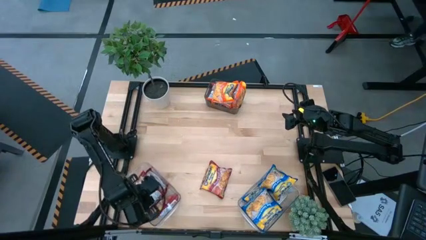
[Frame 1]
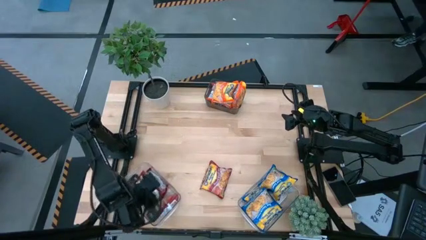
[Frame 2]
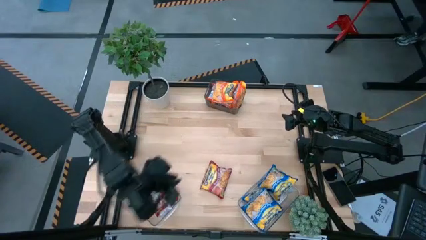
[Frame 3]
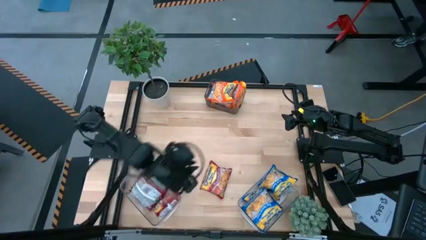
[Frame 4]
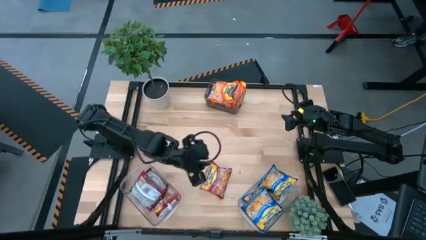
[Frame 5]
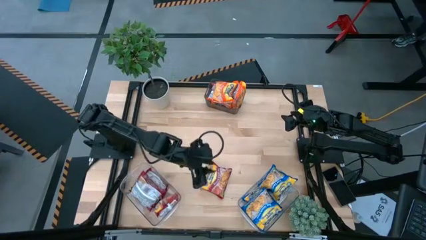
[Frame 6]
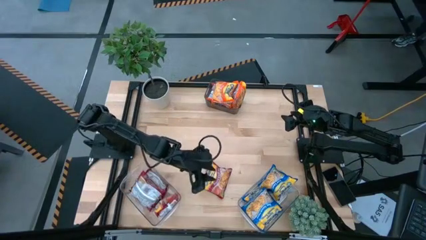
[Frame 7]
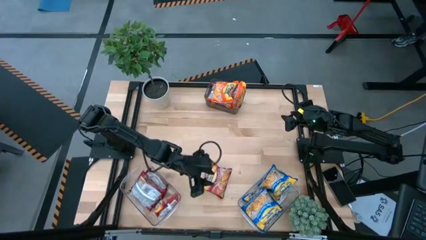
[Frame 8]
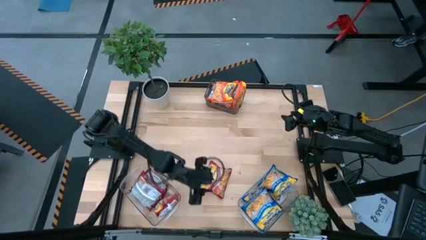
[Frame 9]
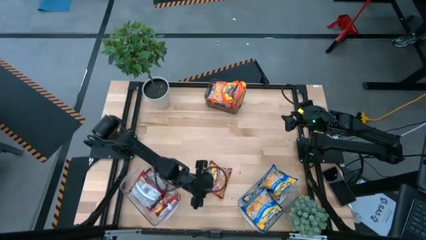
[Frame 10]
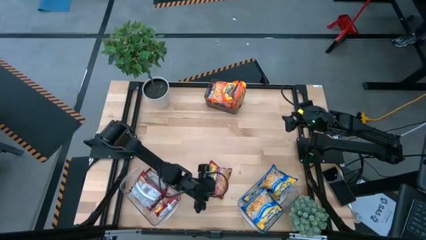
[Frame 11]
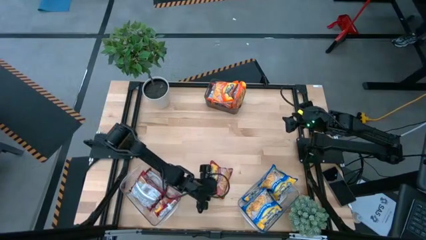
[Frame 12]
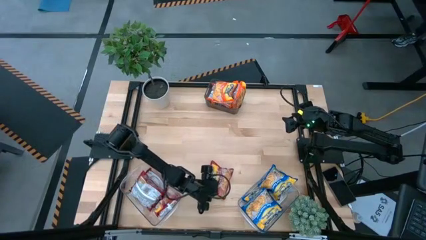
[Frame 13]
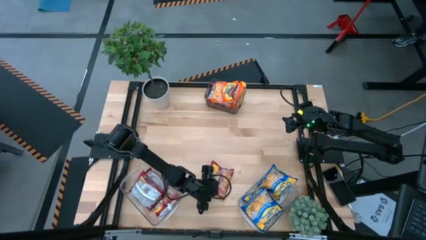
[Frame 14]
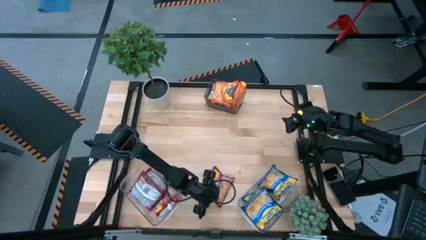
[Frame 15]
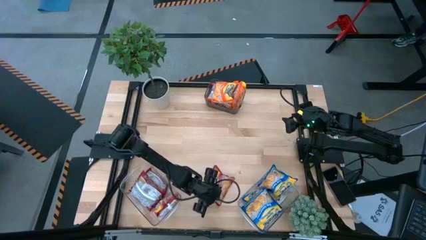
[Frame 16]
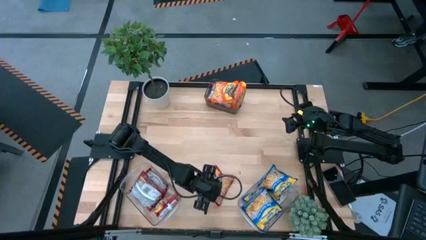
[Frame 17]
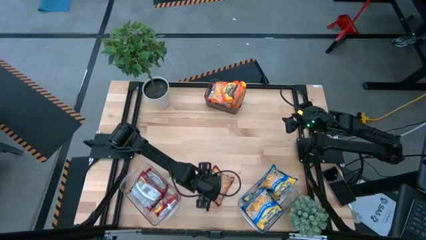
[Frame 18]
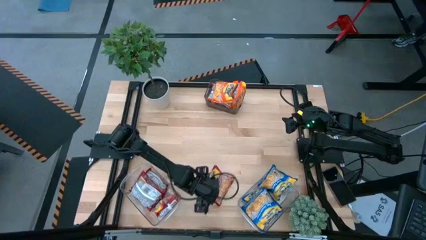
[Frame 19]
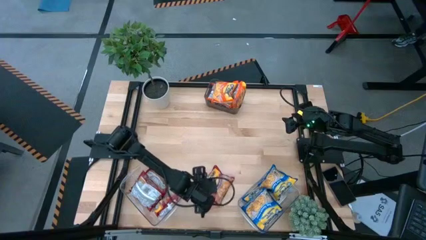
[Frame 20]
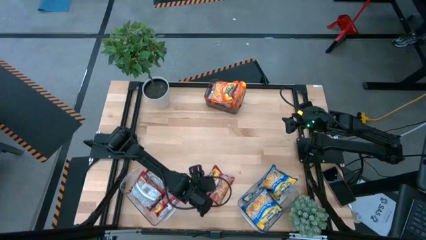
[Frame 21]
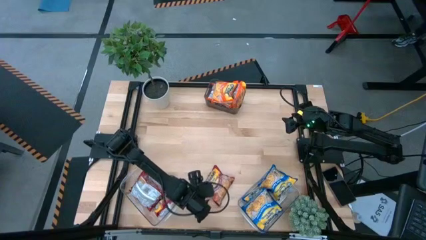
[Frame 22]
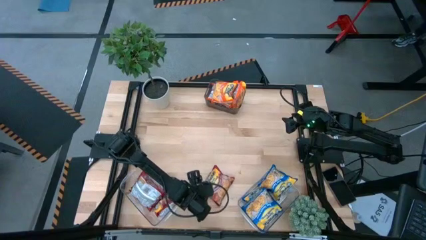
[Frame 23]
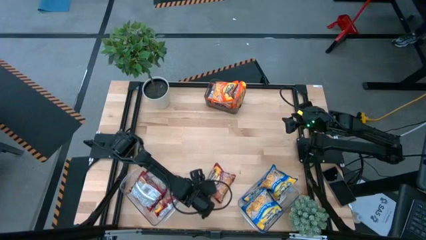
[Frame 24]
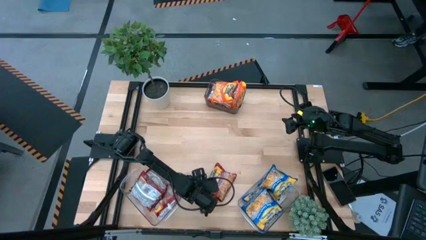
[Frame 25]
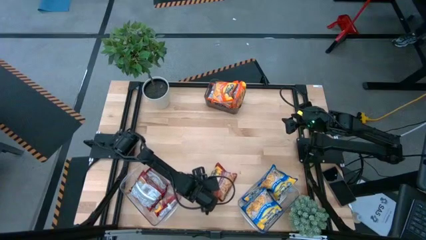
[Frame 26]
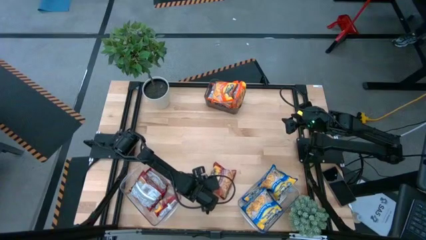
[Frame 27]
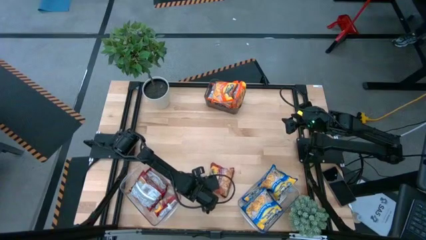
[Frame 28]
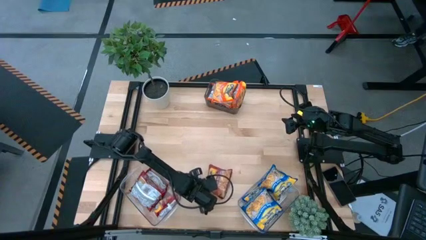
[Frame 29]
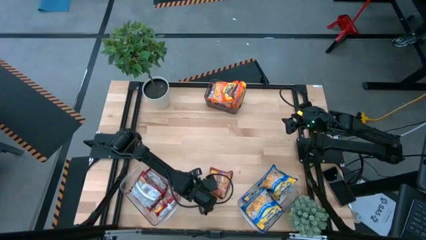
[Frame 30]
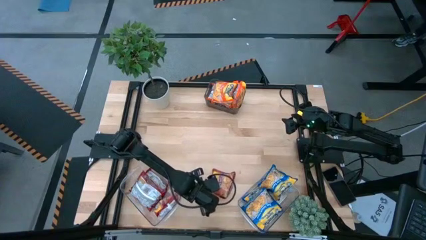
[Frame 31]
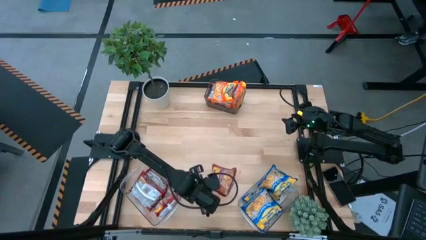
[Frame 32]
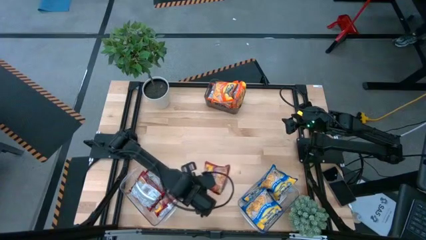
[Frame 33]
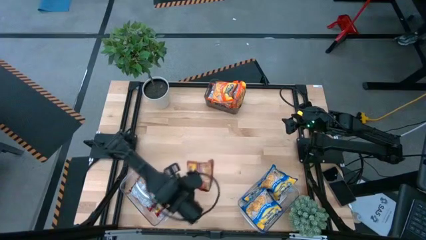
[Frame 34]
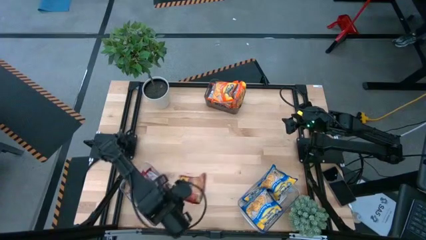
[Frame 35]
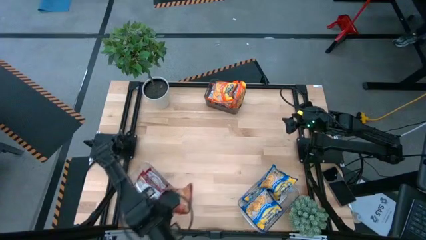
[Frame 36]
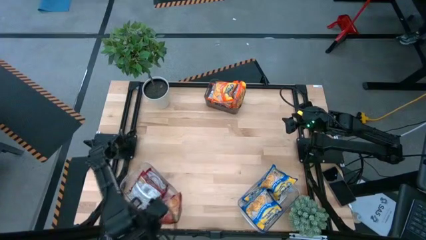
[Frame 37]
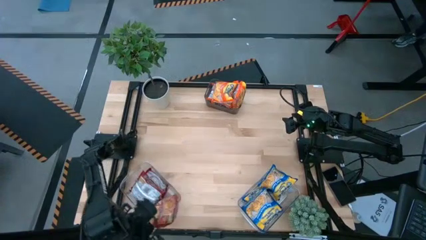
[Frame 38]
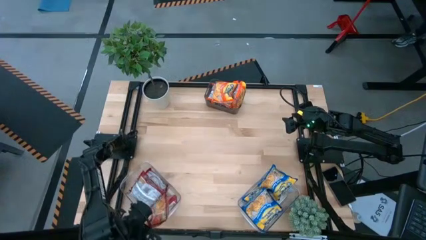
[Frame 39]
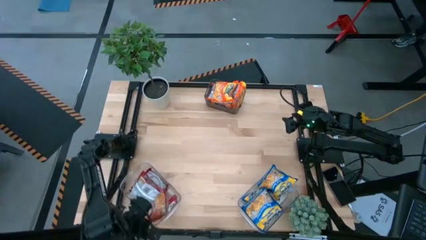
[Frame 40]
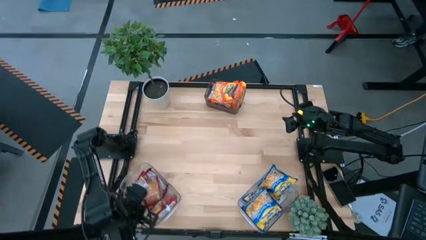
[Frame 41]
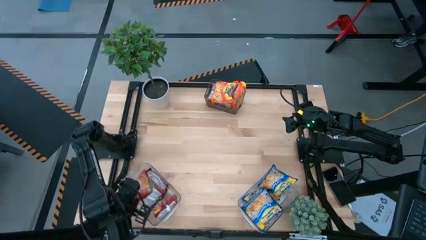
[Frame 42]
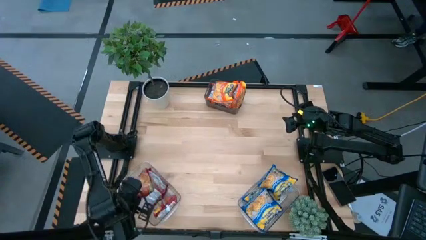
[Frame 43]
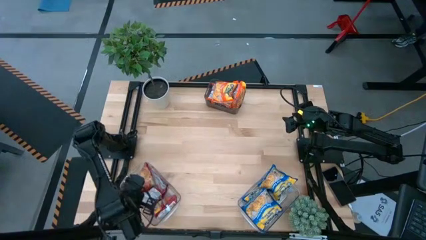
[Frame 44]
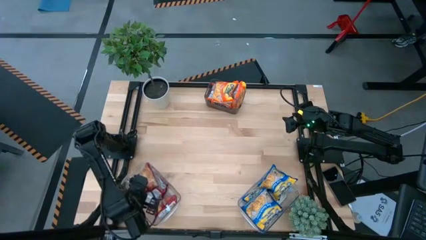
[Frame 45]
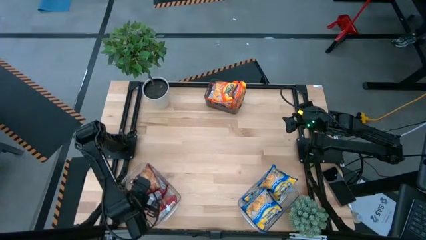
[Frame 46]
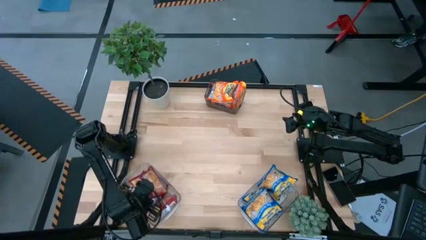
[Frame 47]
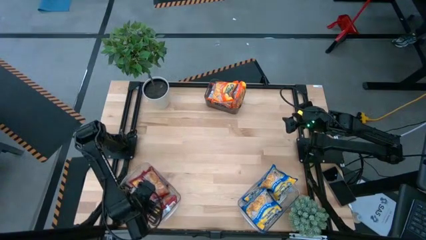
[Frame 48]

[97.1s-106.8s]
Task: Sort Maruchan noodles
Put the red noodle pack into the left transparent bin

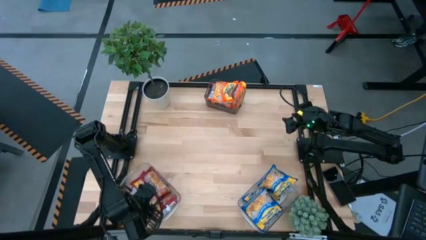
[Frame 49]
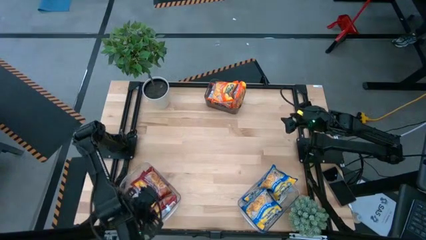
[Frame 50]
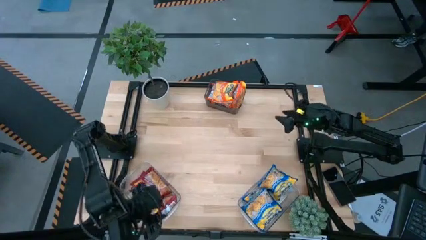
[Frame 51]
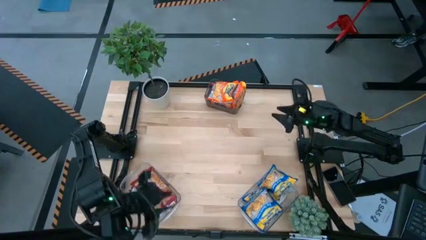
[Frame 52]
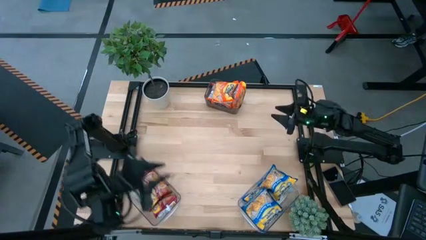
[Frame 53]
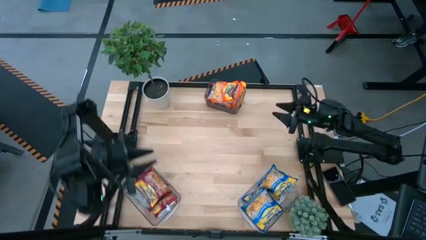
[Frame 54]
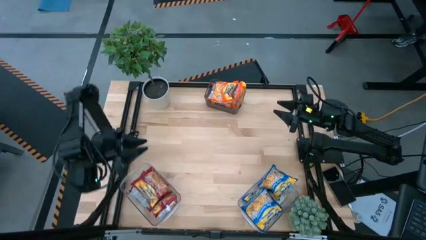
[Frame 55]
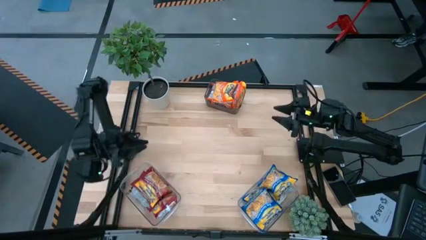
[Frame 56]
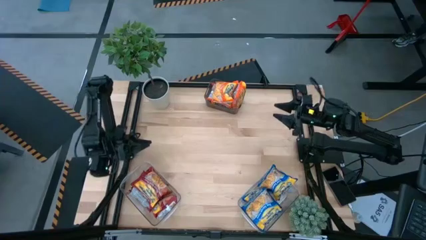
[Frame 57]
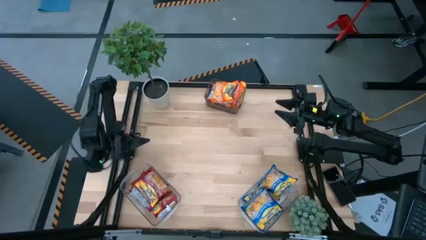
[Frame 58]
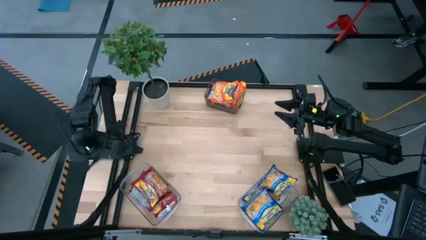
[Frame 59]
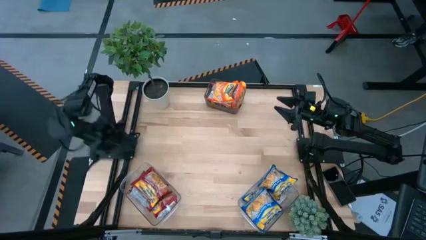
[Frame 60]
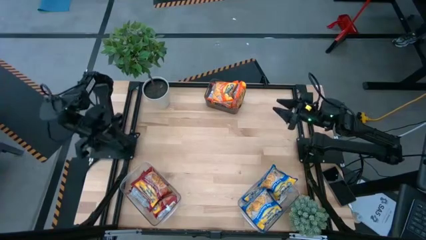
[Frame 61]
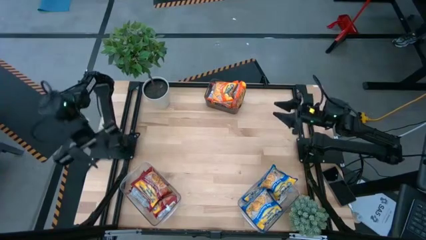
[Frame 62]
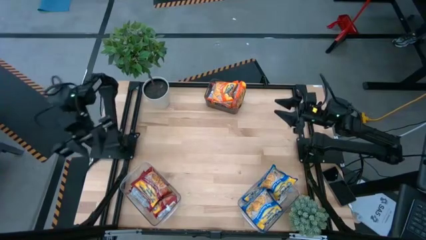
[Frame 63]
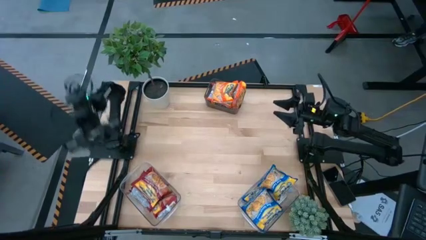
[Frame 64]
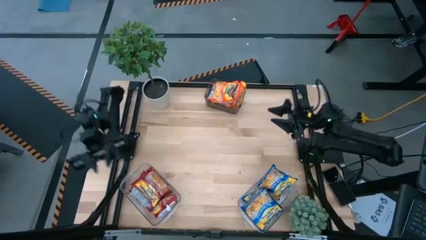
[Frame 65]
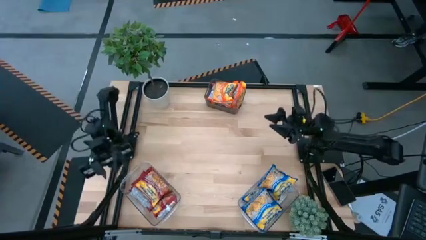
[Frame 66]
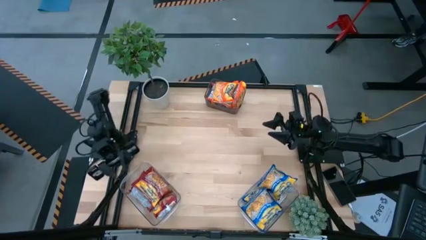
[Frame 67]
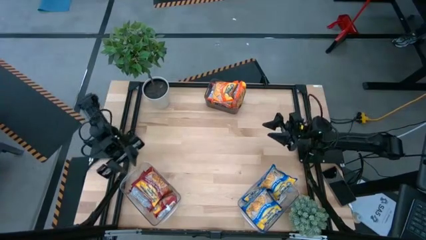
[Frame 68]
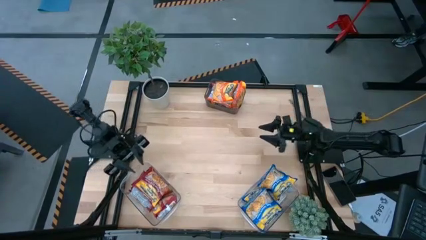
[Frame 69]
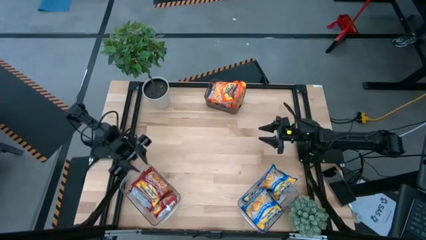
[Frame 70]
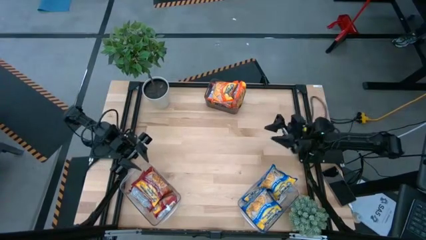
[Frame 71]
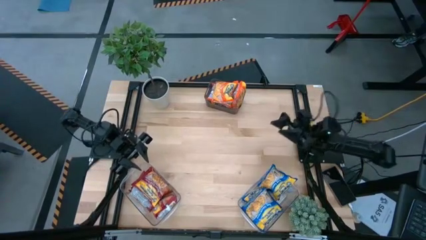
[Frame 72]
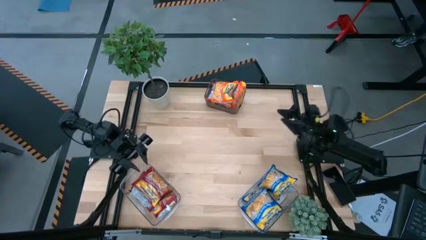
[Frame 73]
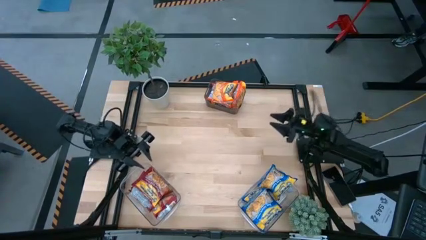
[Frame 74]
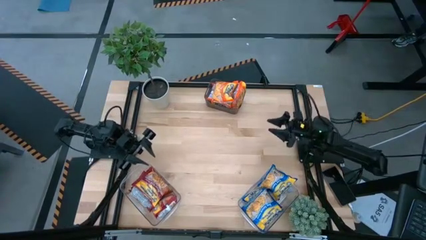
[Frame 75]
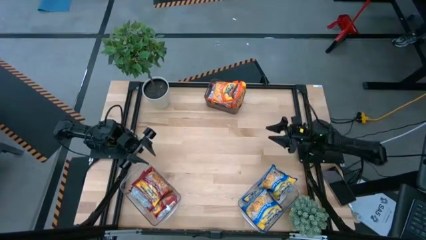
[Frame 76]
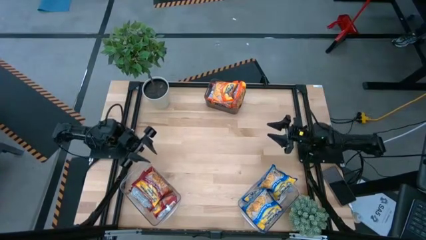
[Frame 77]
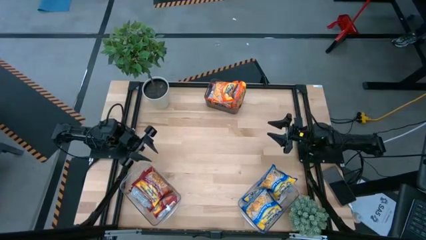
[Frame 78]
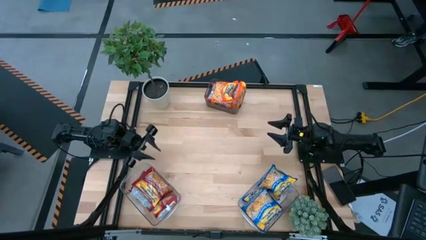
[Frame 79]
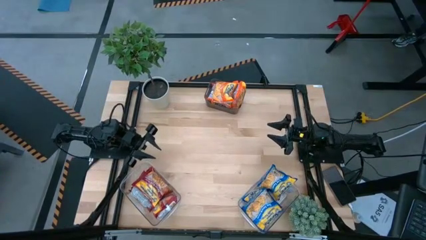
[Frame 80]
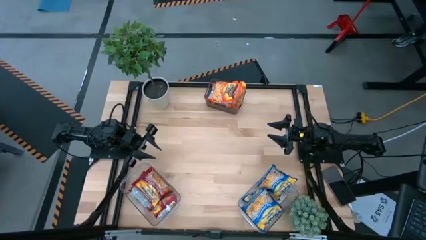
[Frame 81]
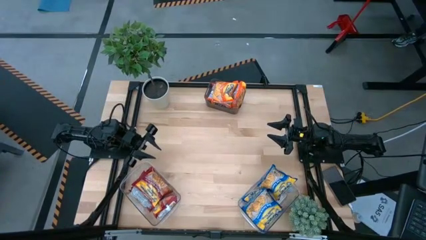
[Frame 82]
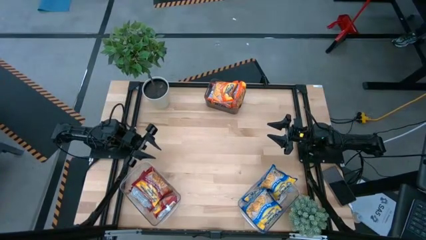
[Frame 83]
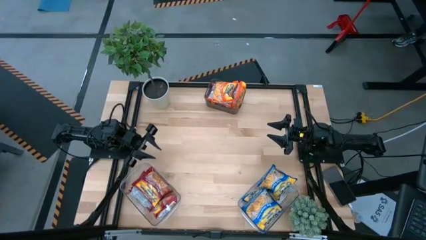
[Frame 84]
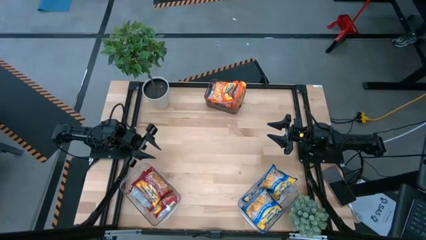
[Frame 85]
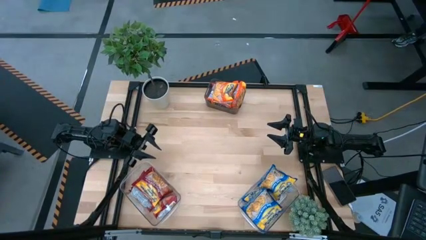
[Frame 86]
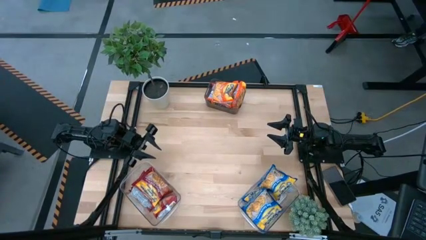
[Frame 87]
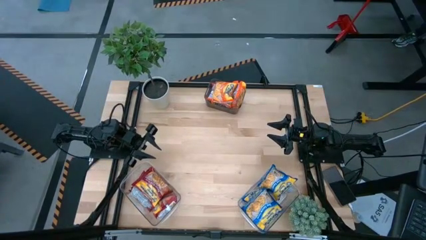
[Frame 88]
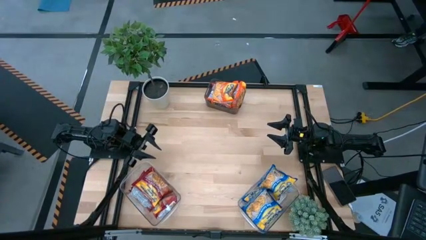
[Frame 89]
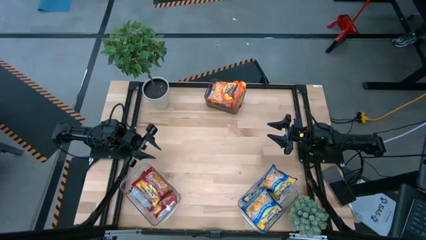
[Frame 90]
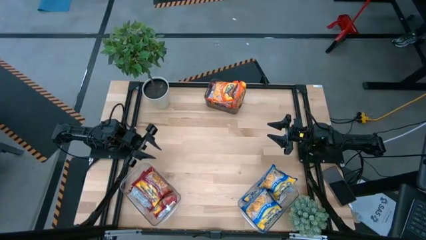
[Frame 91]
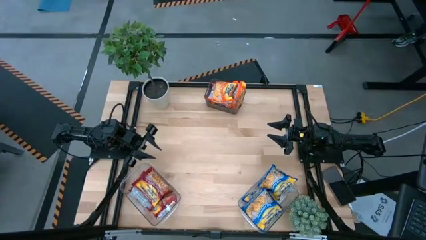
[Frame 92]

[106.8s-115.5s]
Return to Home Position
